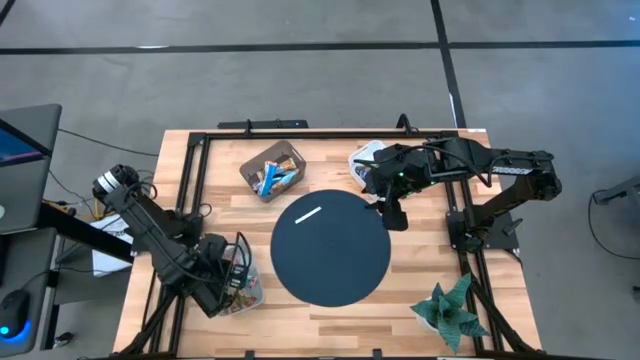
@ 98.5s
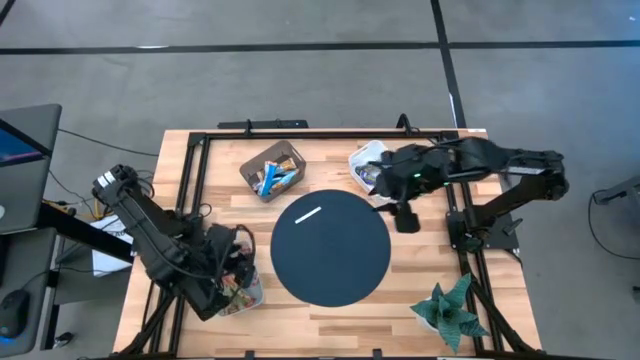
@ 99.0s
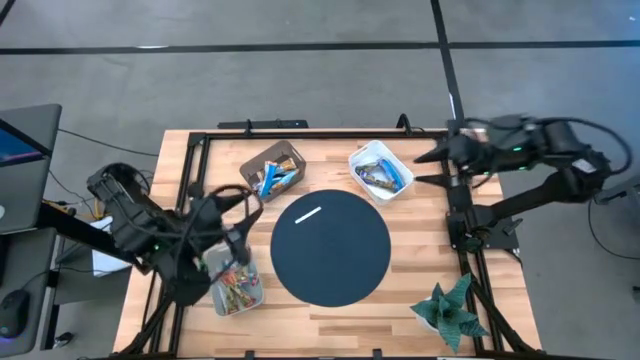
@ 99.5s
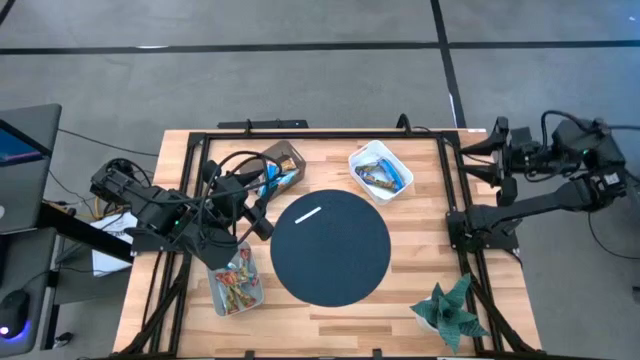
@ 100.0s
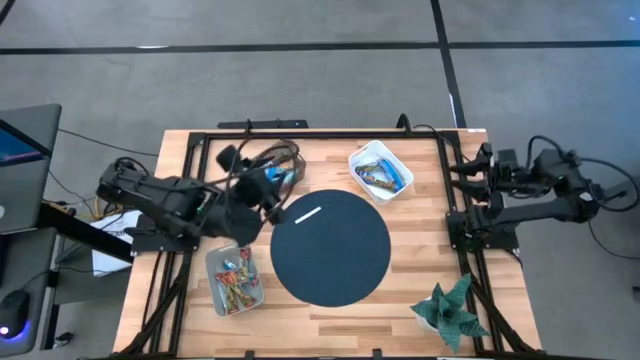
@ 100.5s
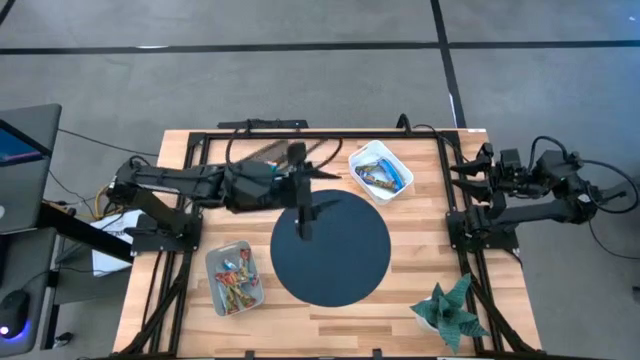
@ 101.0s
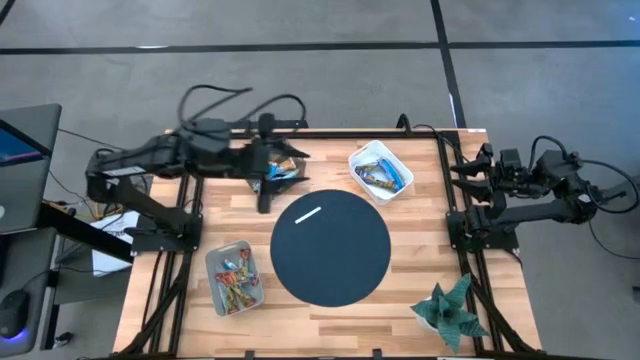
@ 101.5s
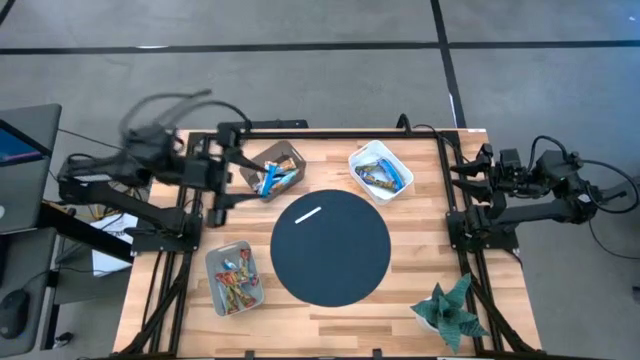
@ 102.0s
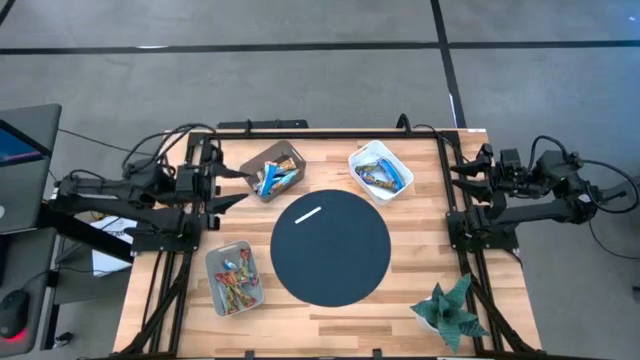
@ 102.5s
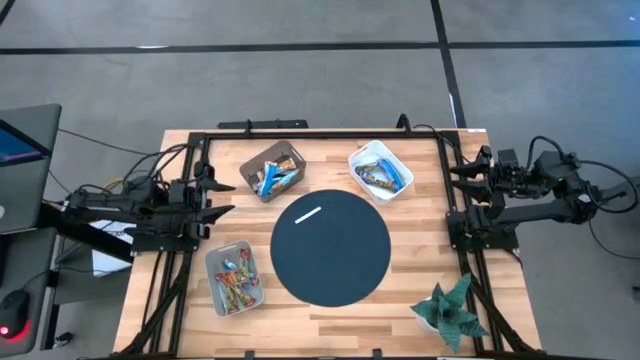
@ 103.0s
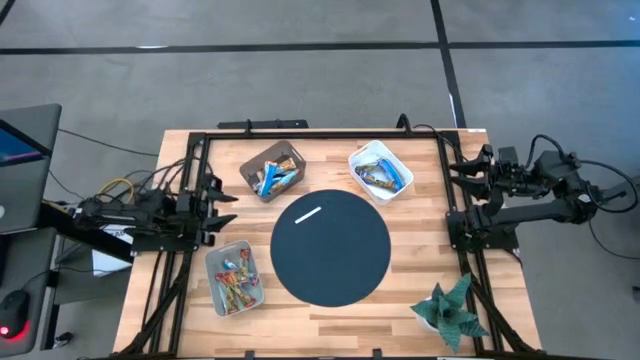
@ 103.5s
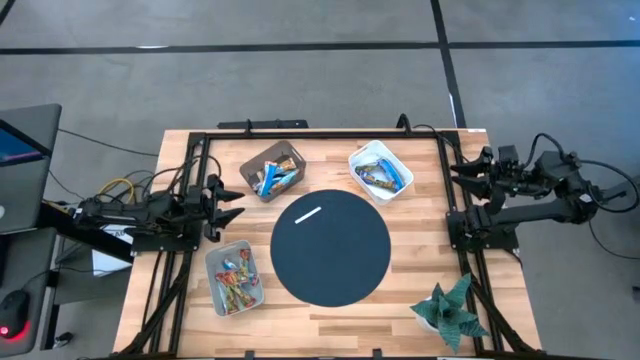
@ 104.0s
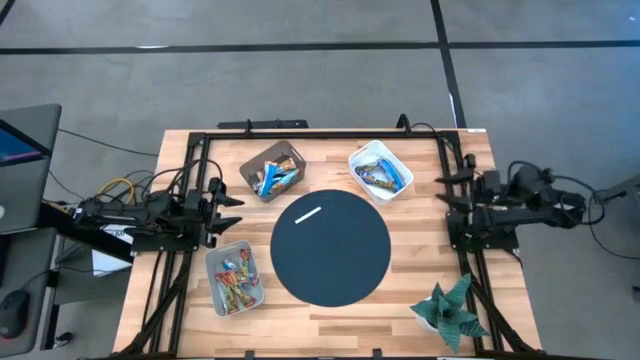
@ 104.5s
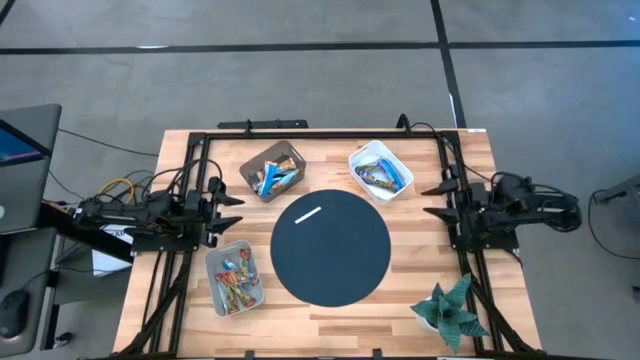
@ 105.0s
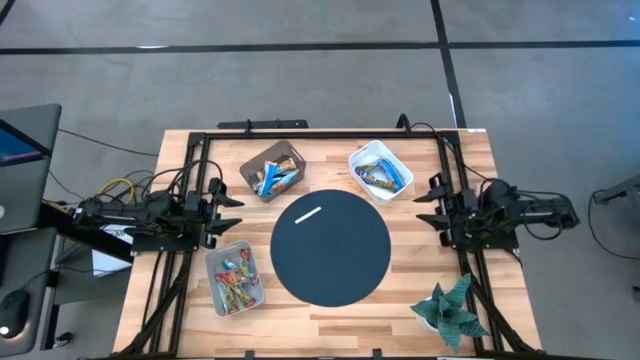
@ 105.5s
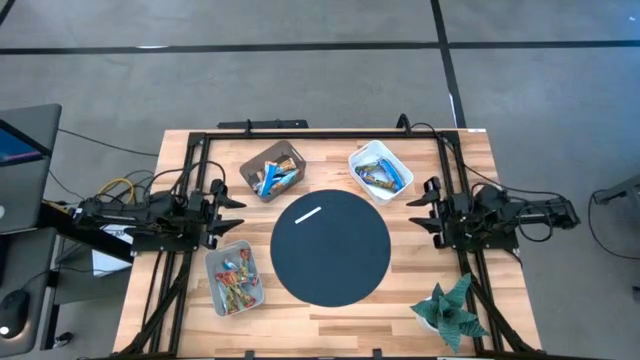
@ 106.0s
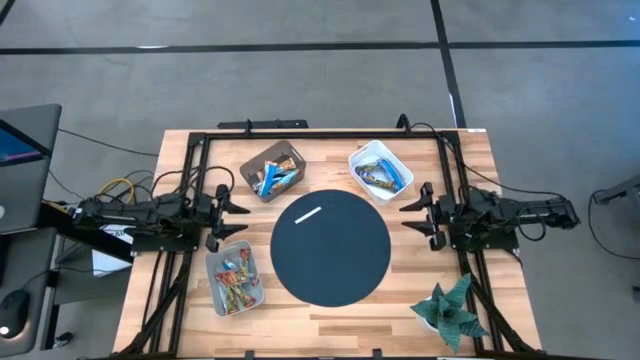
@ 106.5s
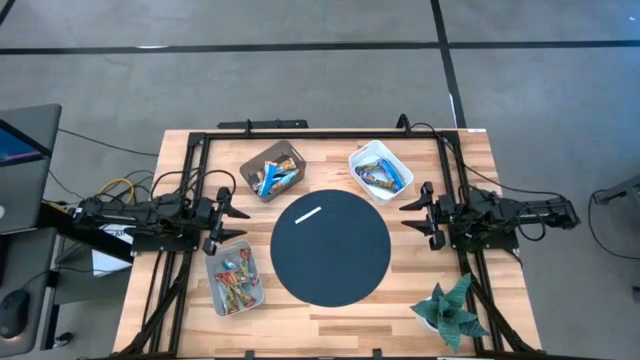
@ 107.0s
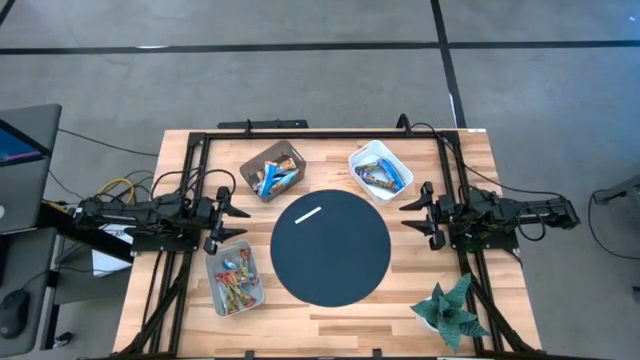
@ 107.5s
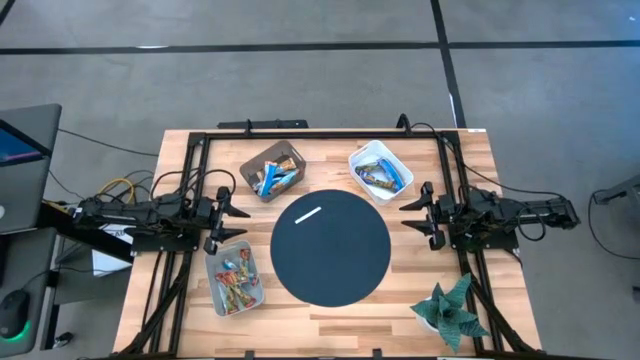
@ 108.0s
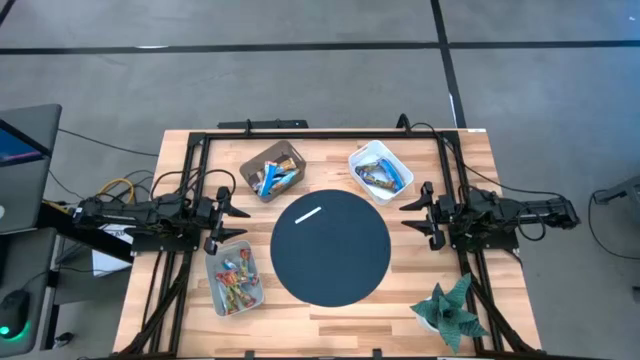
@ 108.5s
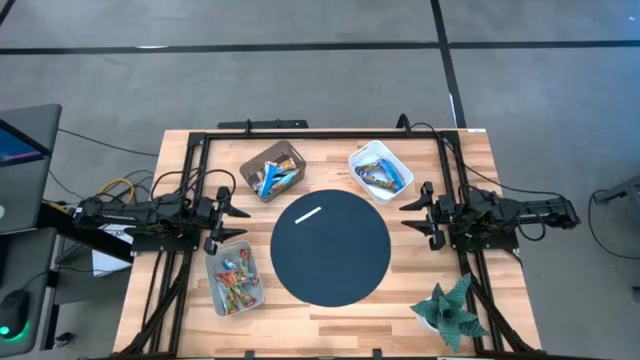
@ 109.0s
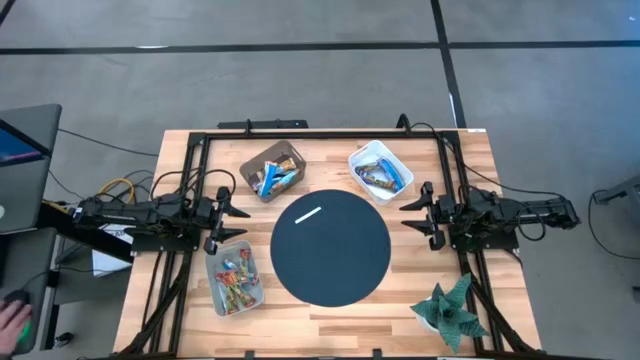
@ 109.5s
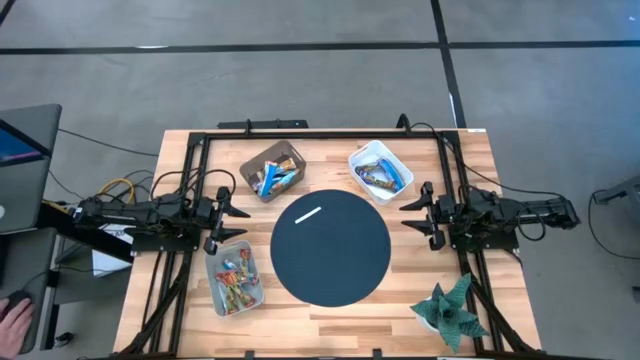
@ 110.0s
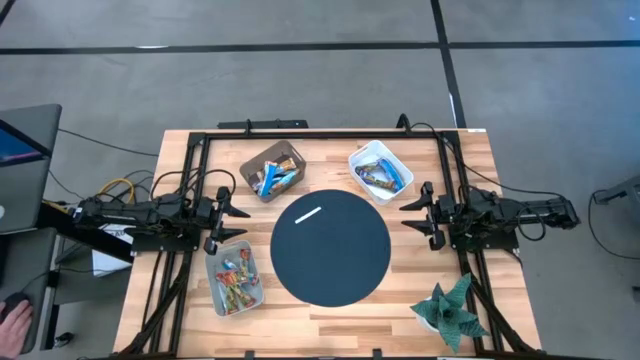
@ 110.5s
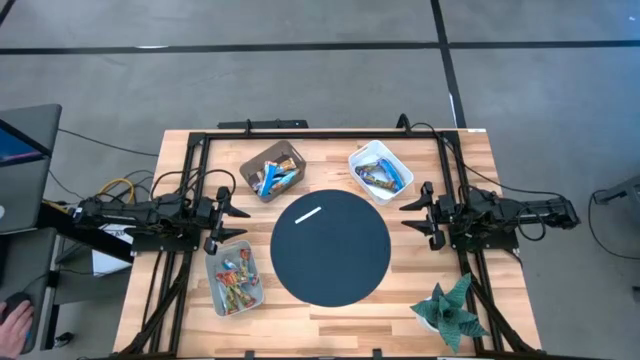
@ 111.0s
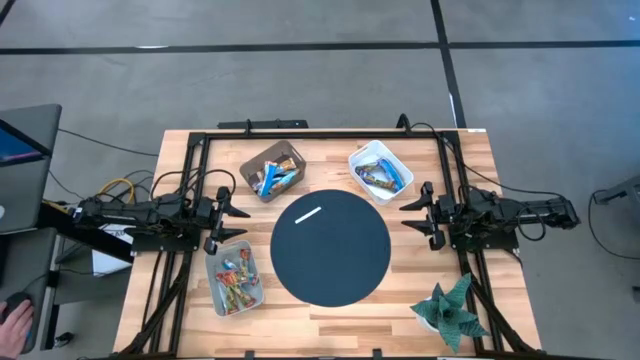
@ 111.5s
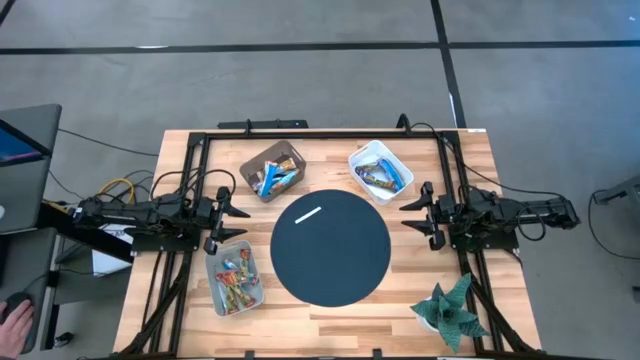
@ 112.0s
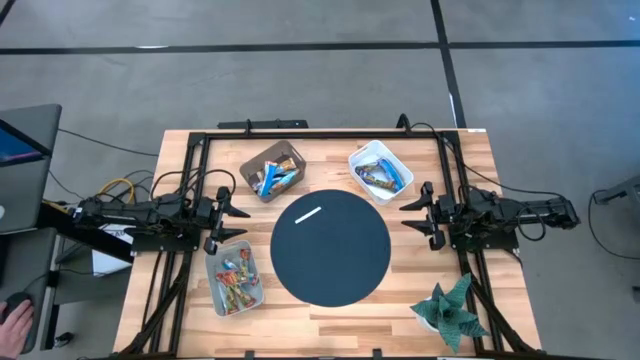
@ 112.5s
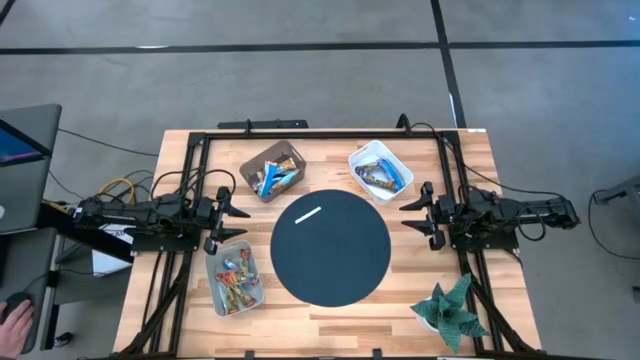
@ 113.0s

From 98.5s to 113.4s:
Task: Pick and place Granola Bars by type
Return to Home Position

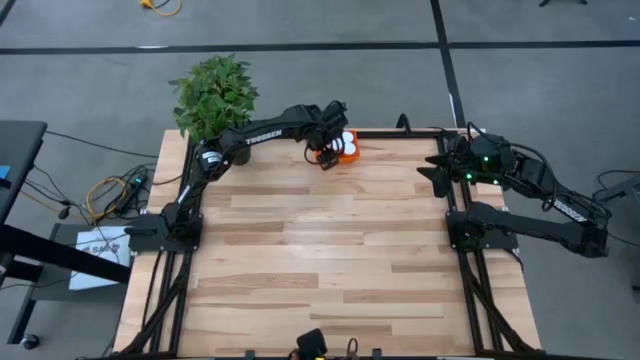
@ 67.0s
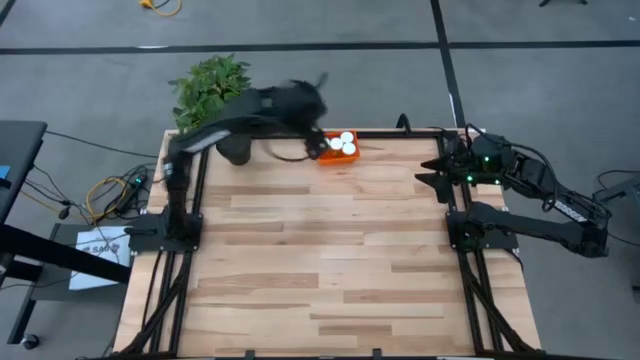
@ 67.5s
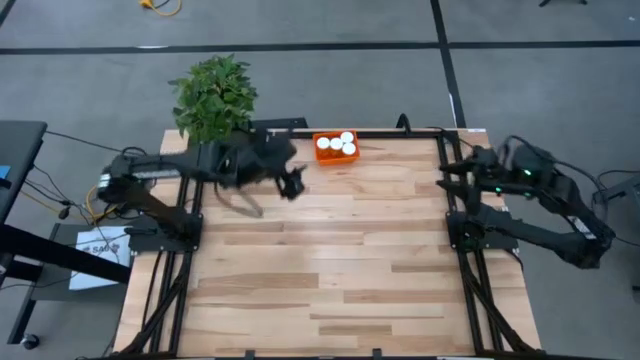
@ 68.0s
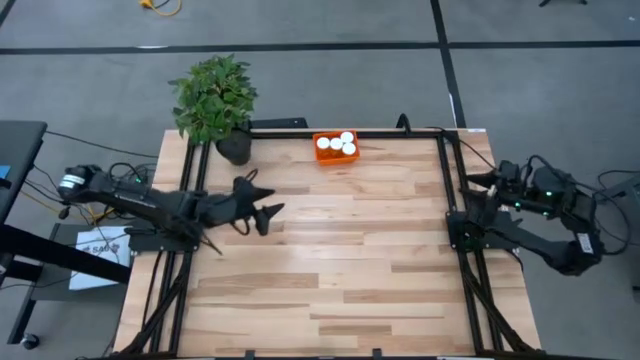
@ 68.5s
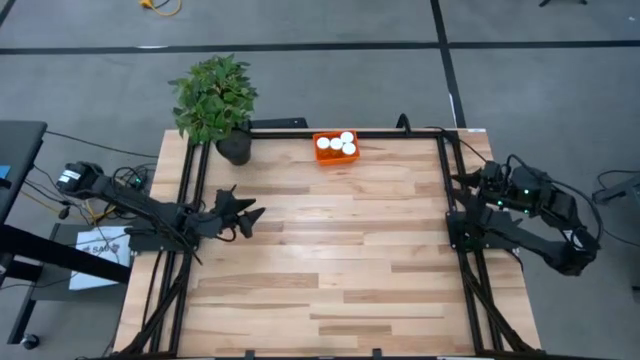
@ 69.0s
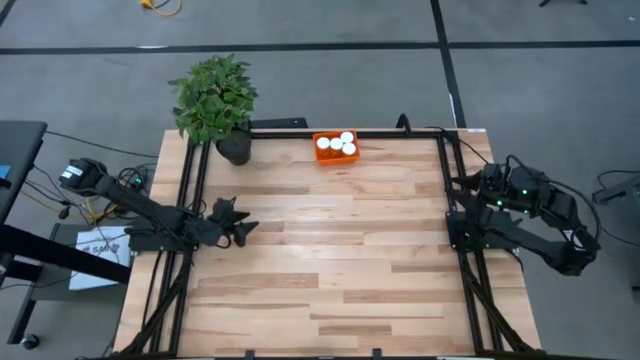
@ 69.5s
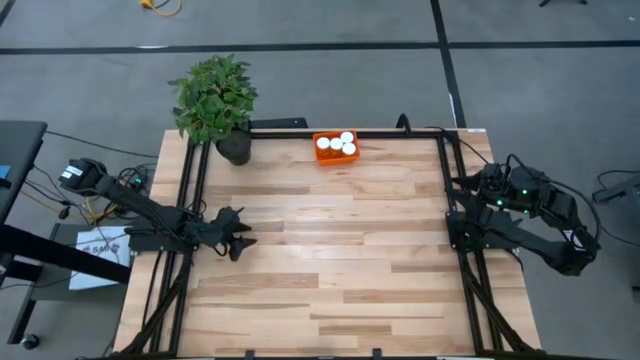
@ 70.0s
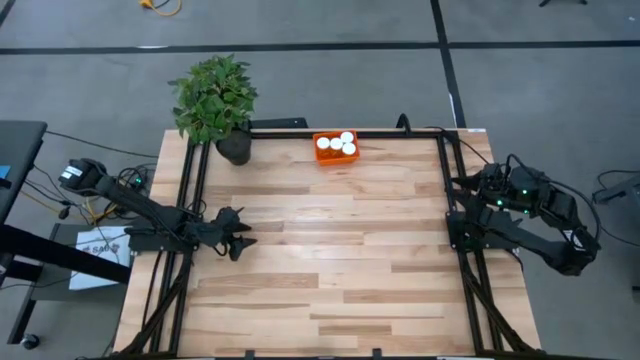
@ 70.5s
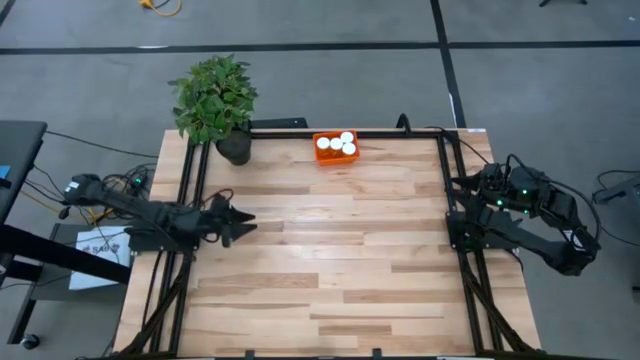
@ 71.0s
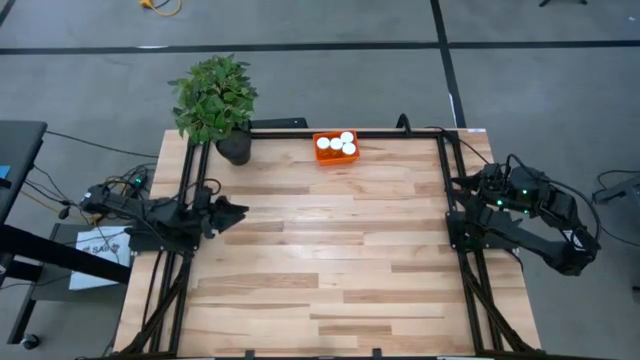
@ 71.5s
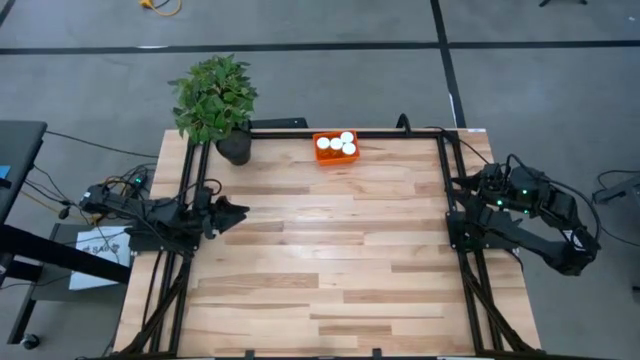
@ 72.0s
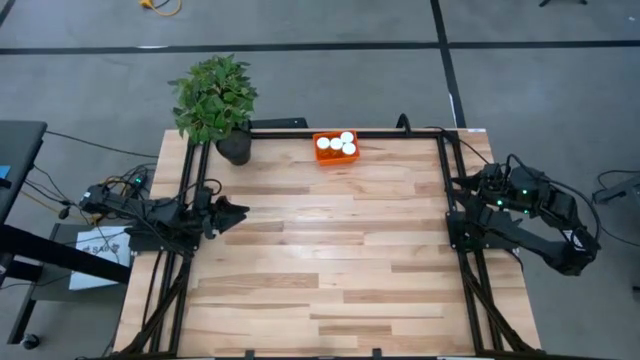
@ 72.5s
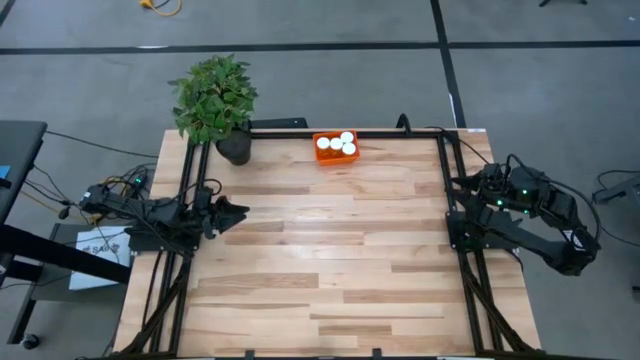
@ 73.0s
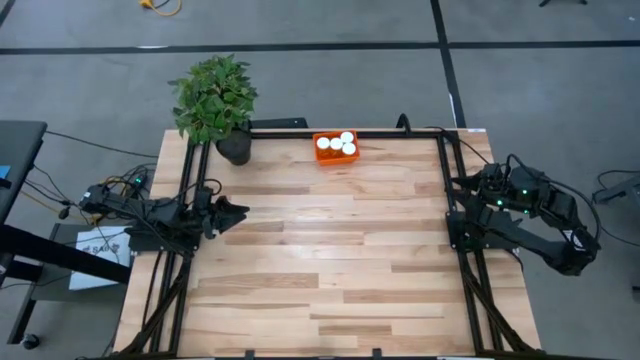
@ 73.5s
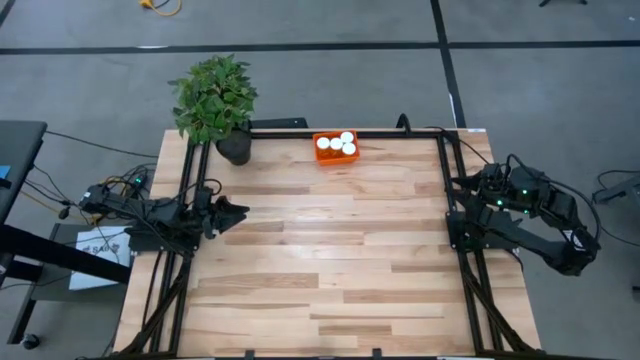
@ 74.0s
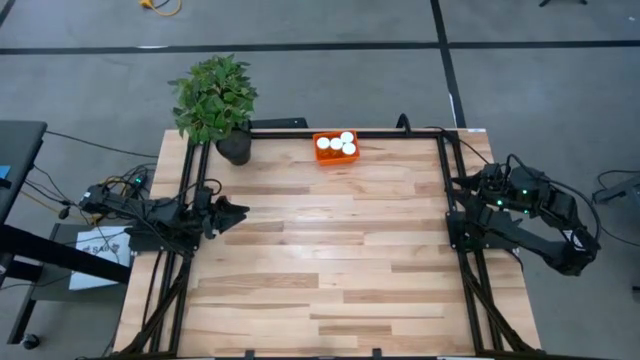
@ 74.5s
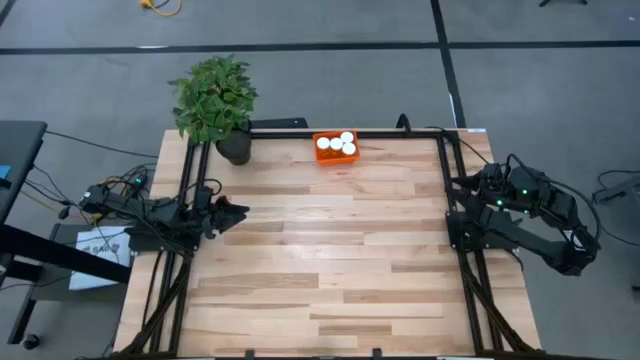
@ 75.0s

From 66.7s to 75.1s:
Task: Pick and place pill bottles into a basket
Return to Home Position
